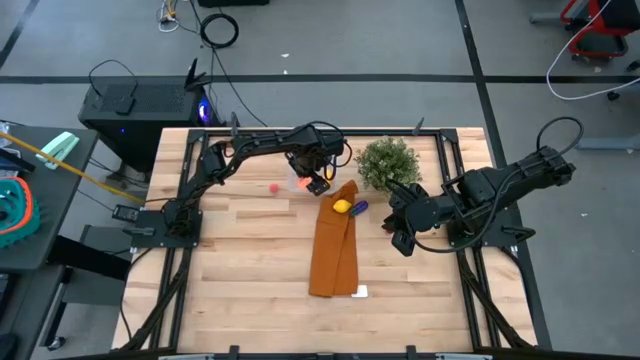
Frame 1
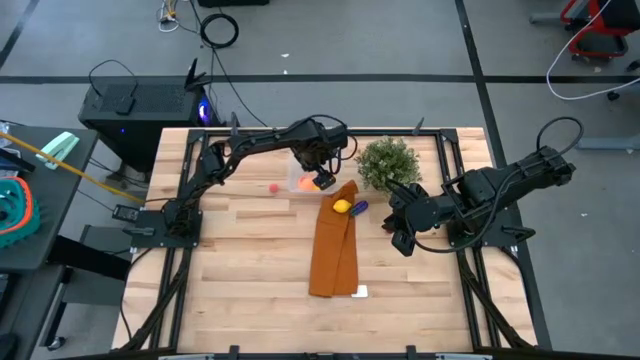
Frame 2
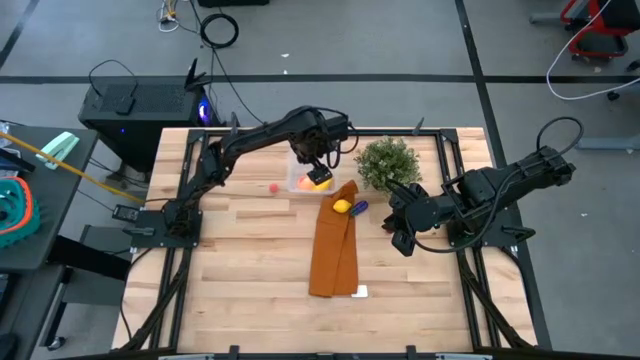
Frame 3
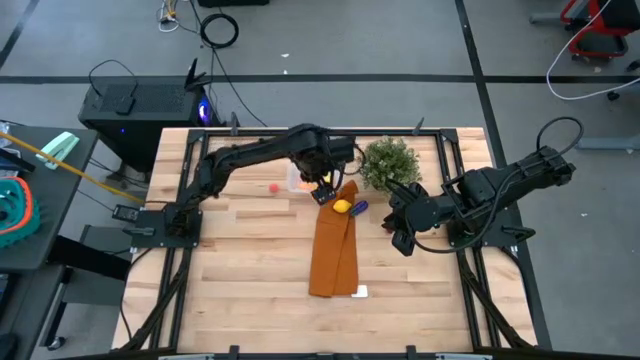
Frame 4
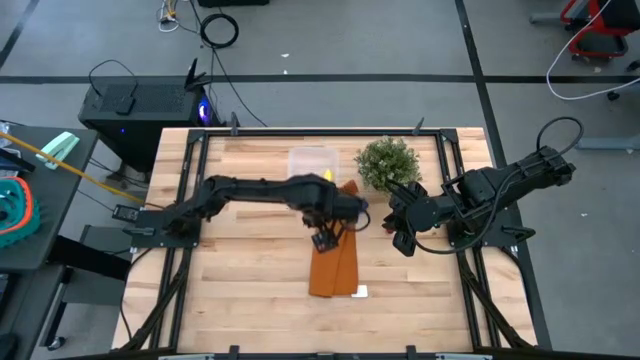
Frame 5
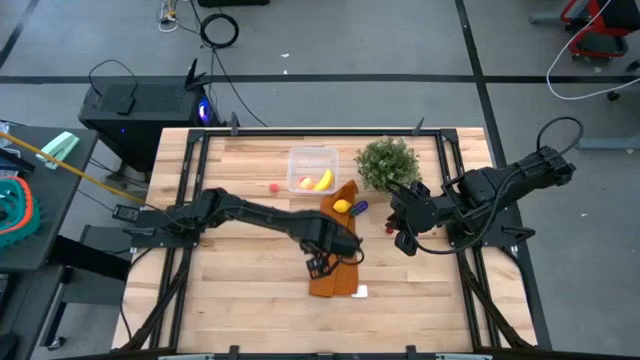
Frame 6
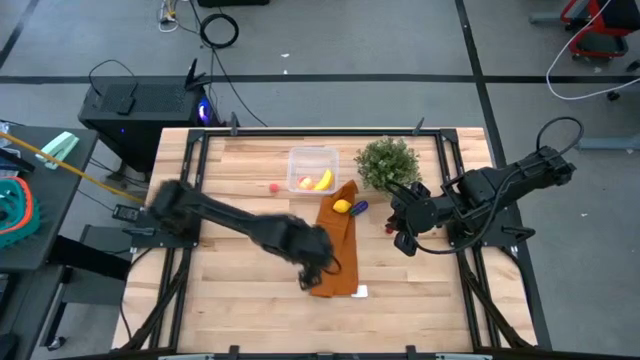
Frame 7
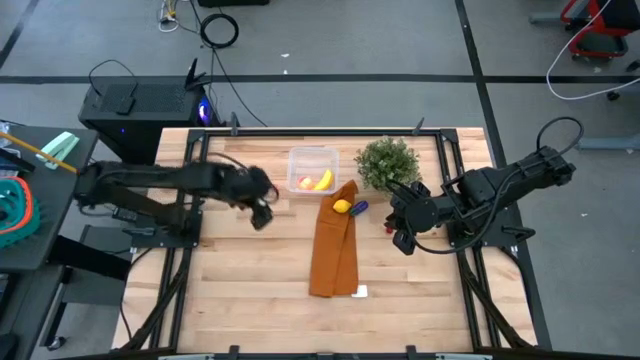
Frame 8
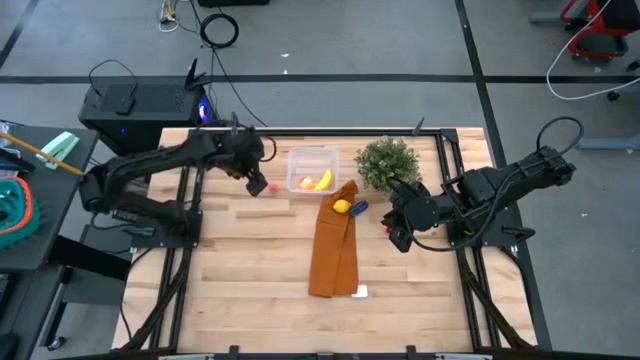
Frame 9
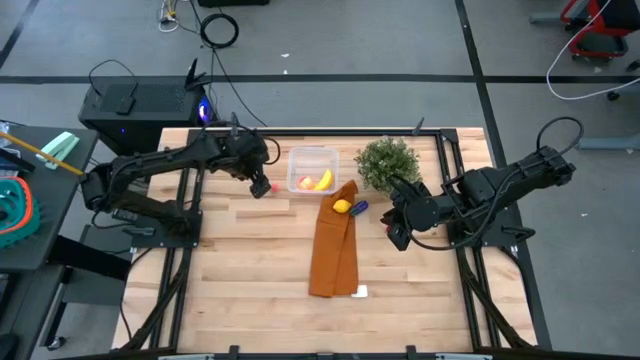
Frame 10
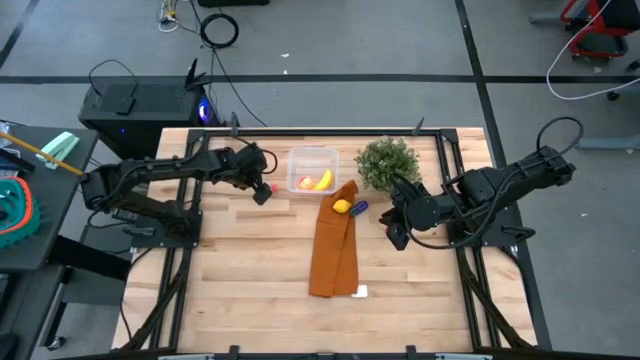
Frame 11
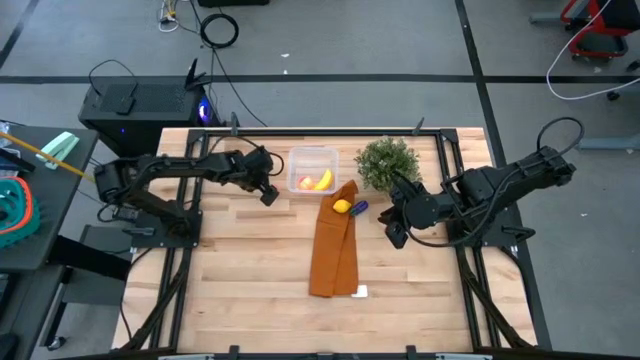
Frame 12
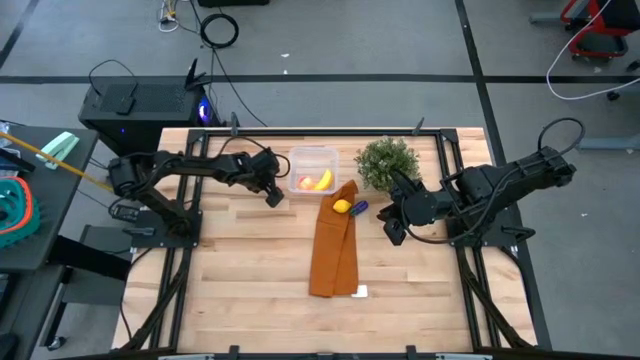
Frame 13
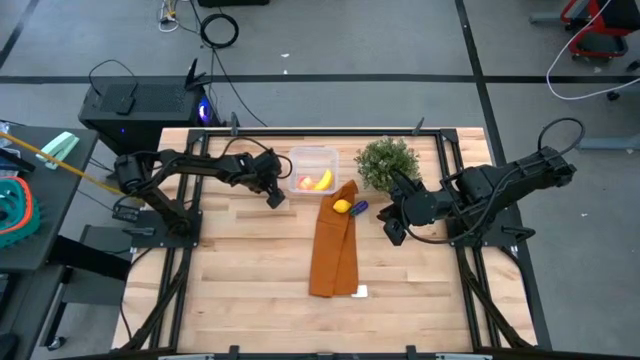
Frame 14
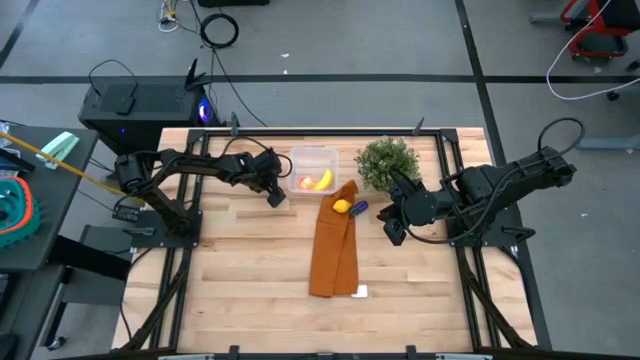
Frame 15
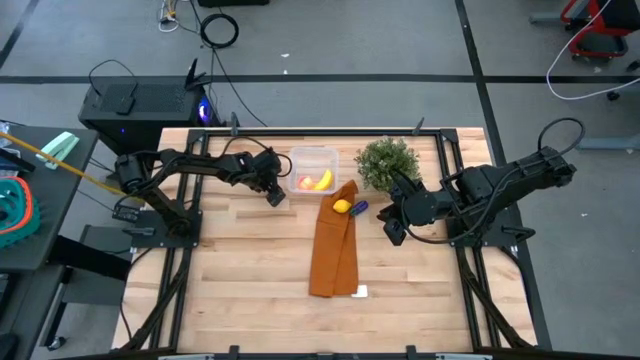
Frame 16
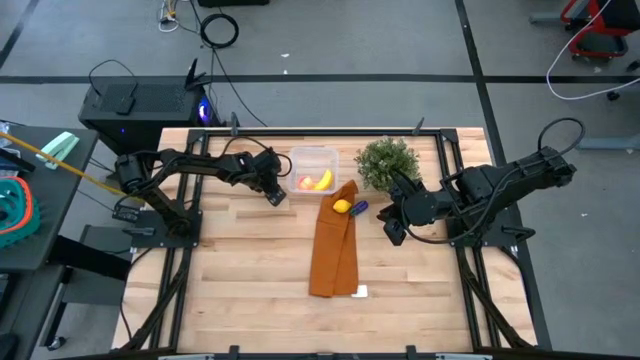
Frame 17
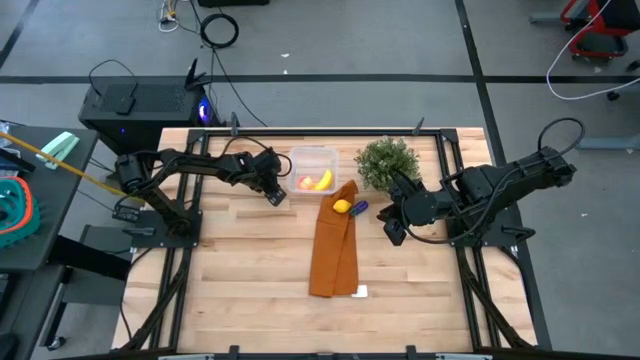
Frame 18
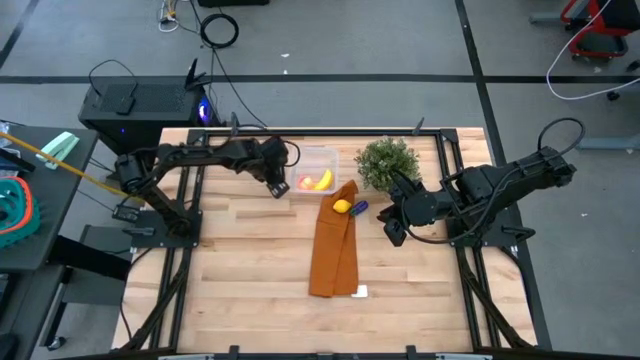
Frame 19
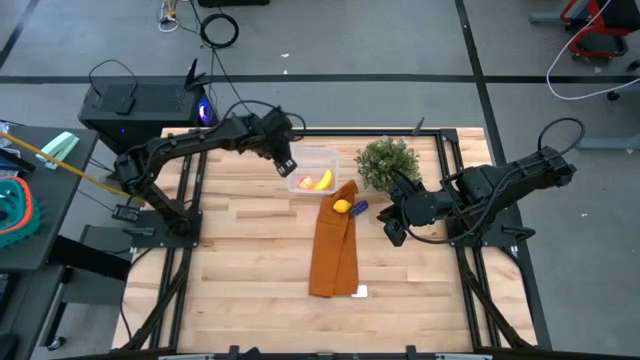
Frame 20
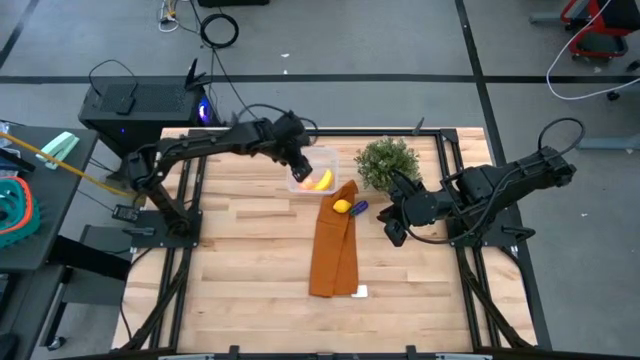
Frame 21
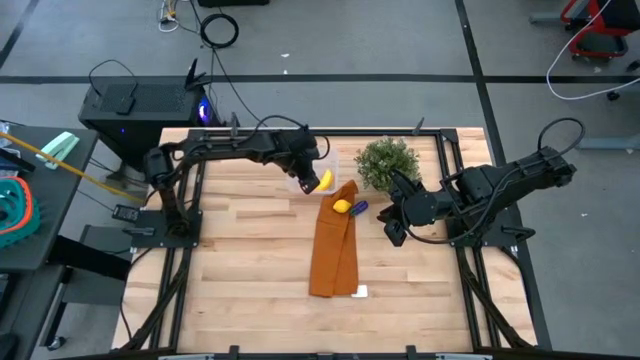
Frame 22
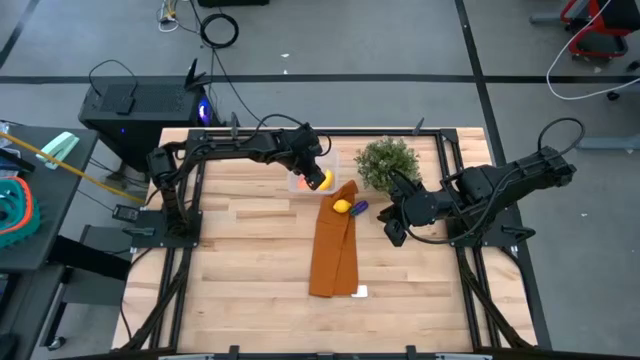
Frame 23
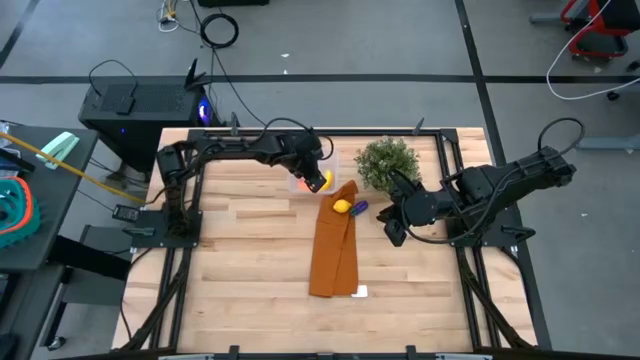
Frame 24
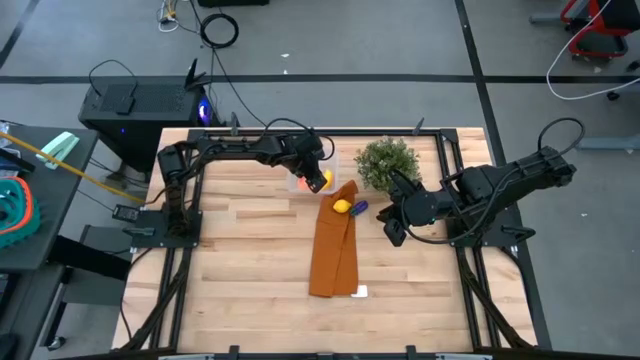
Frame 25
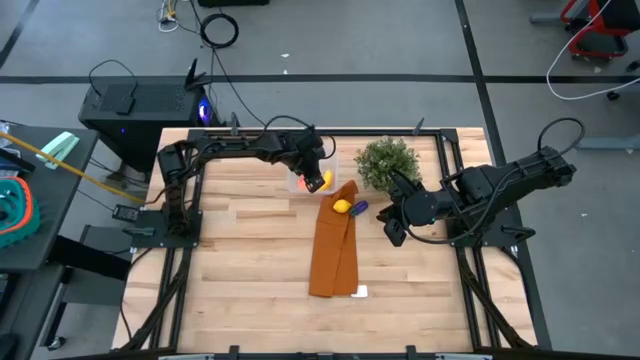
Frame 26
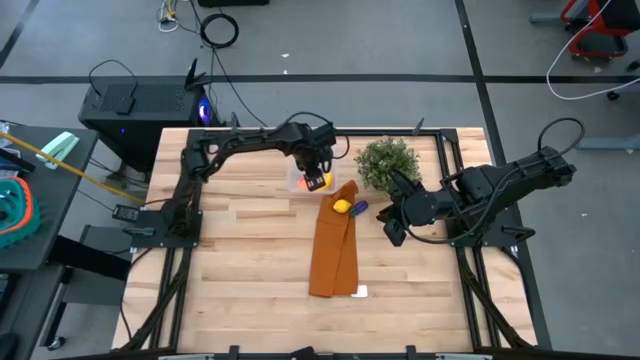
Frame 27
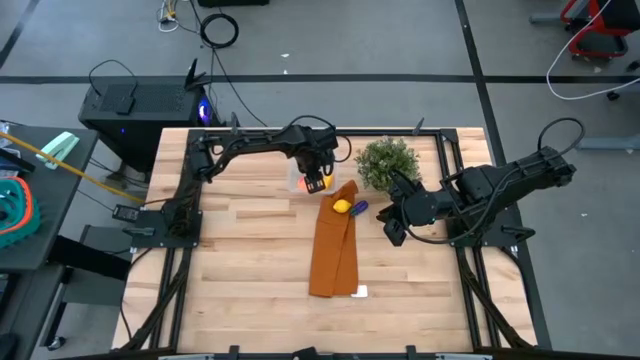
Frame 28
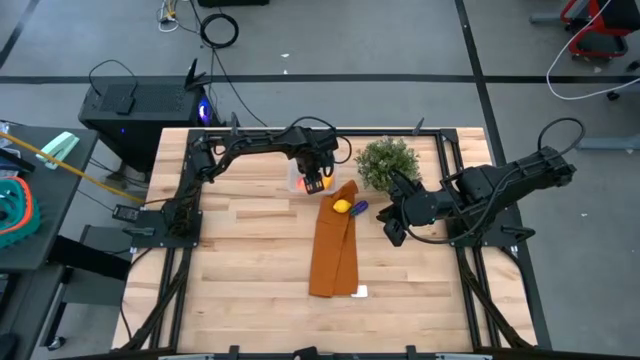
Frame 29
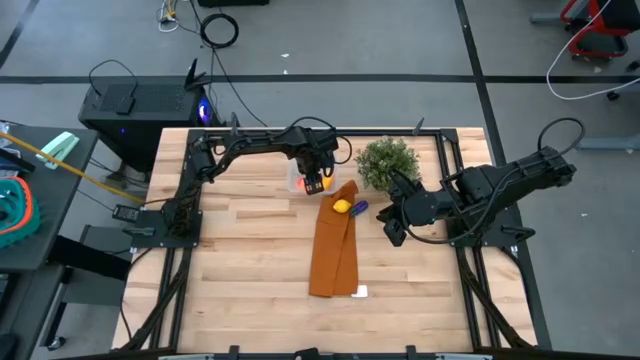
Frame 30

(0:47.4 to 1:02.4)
Task: Pick and placing Produce into tupperware
Put the pink peach into the transparent bin

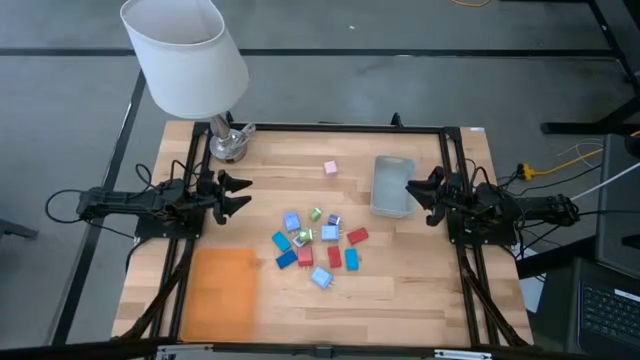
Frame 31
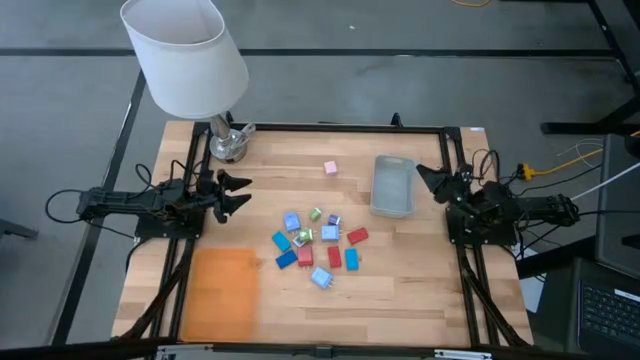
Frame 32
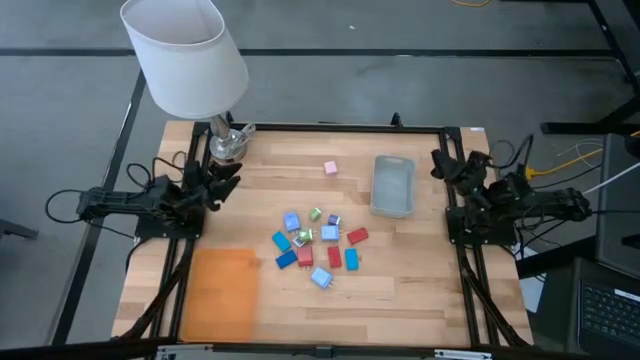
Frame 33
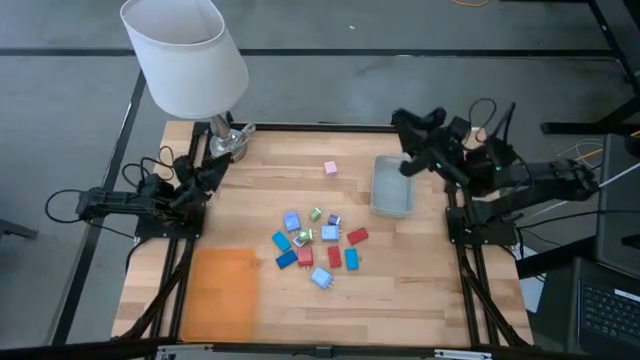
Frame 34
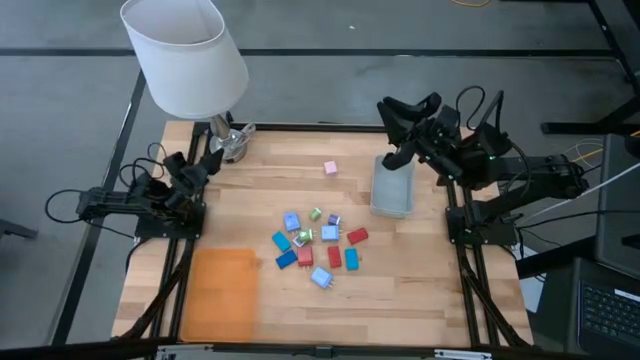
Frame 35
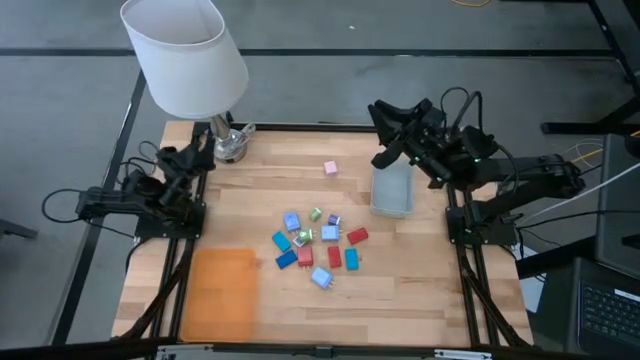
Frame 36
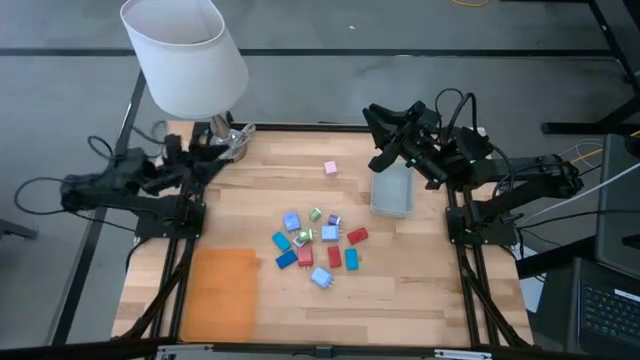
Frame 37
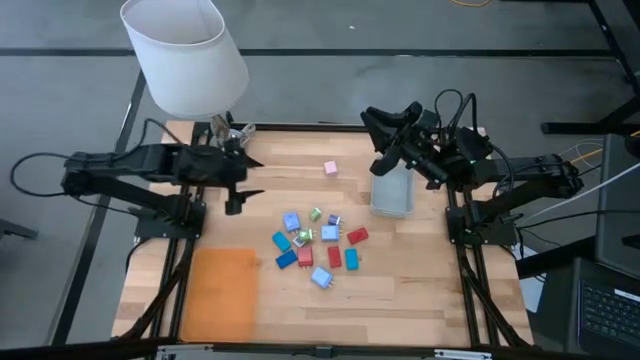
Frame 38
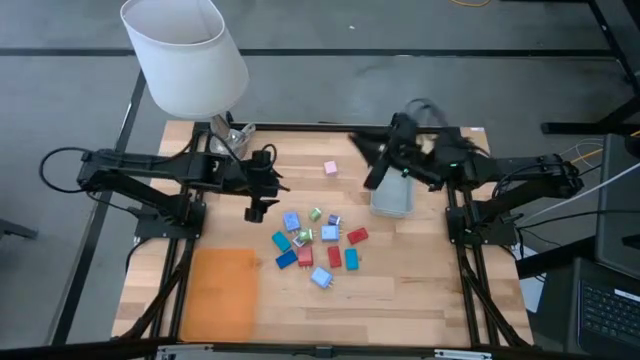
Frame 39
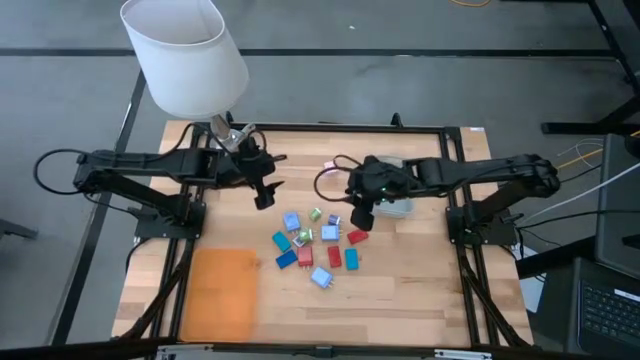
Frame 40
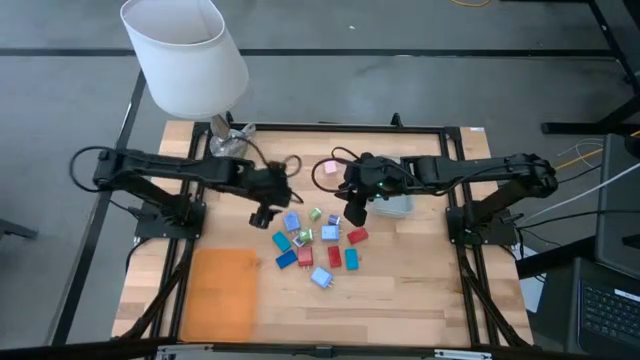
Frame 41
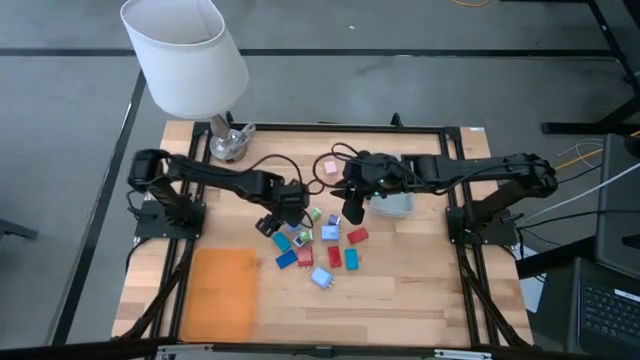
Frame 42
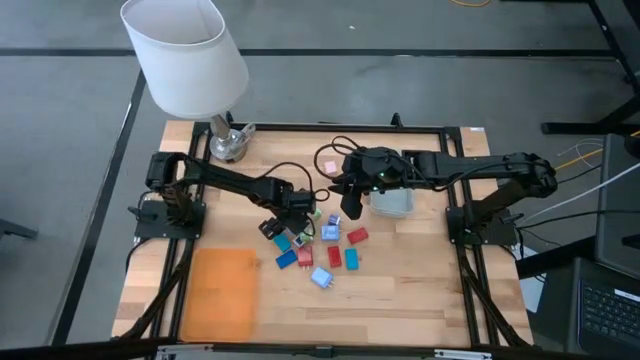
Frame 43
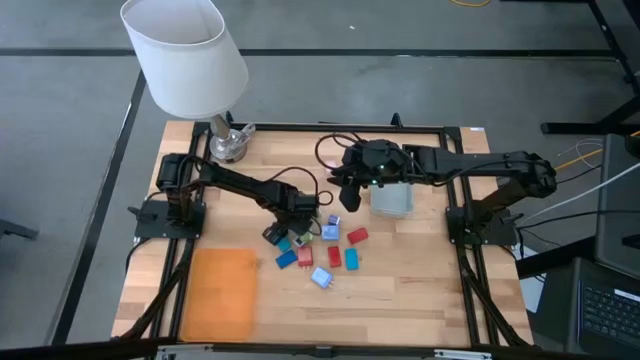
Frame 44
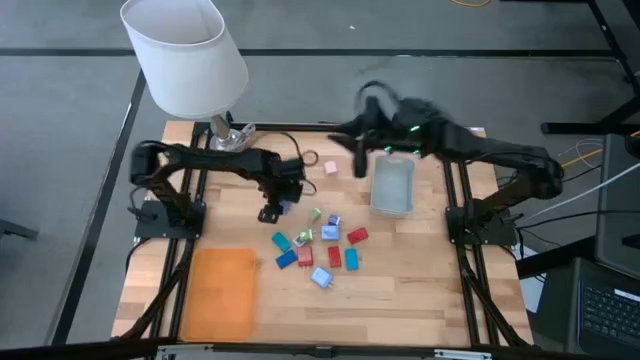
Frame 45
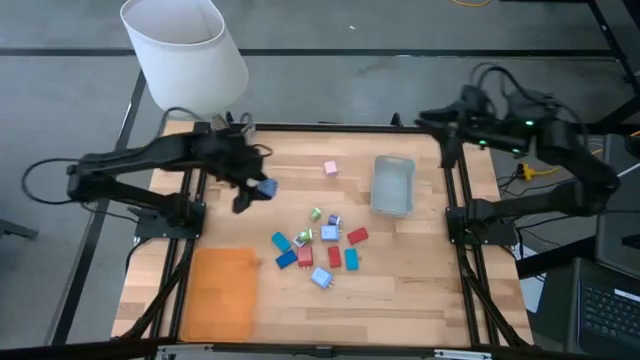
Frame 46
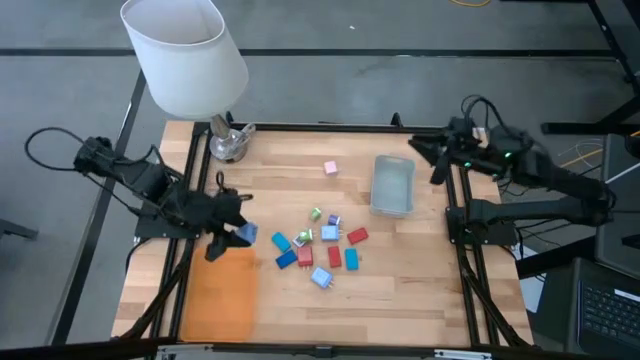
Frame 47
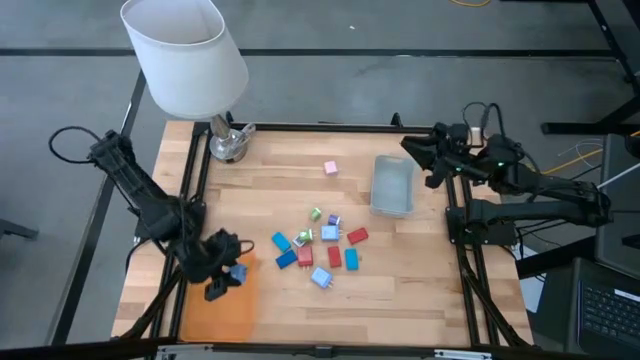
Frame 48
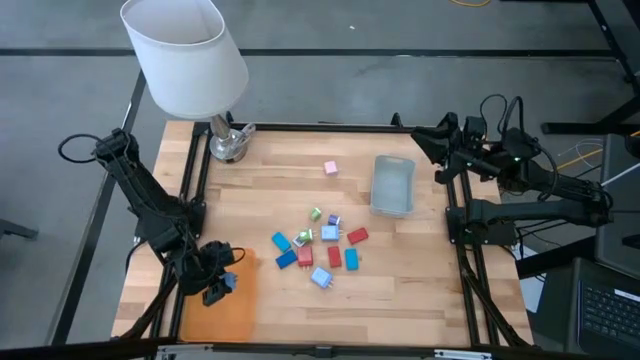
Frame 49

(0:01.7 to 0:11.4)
Task: Pick & Place Office items
Put the top left light blue charger adapter into the orange bin
